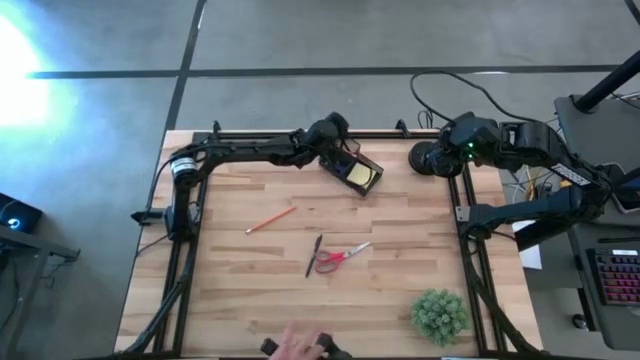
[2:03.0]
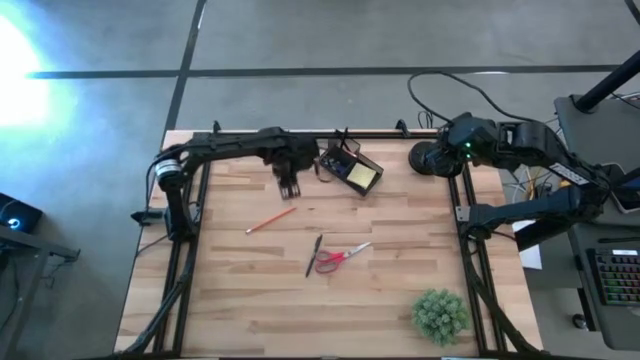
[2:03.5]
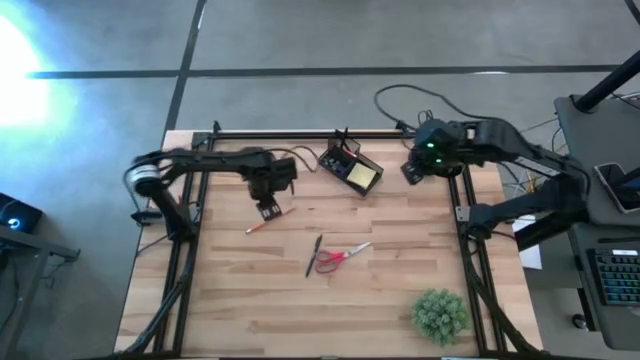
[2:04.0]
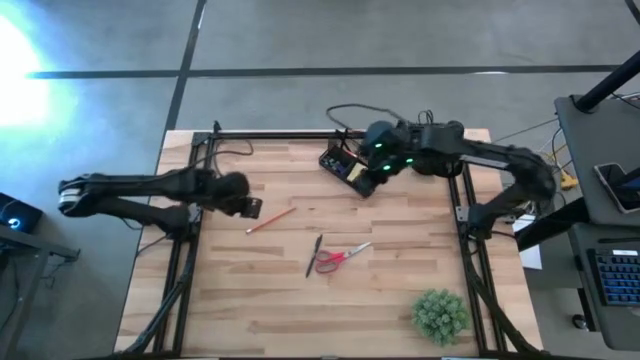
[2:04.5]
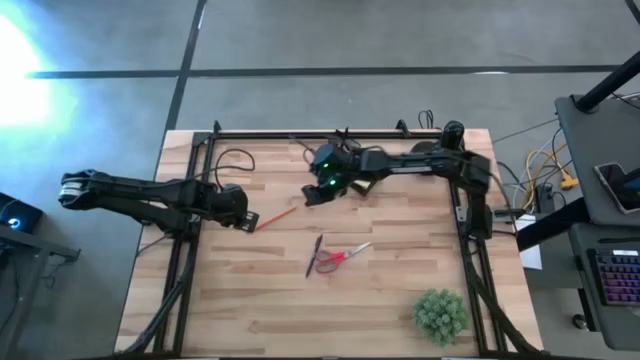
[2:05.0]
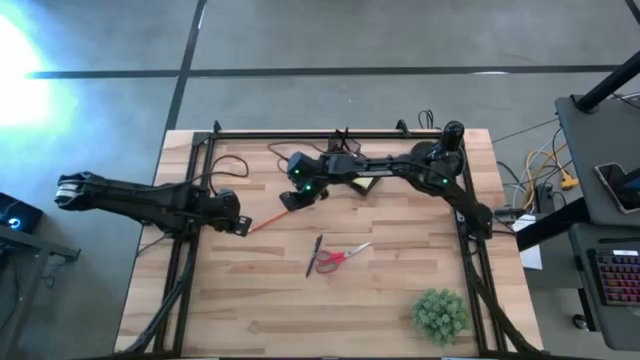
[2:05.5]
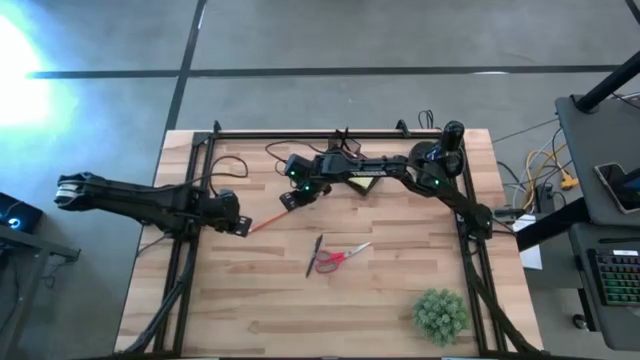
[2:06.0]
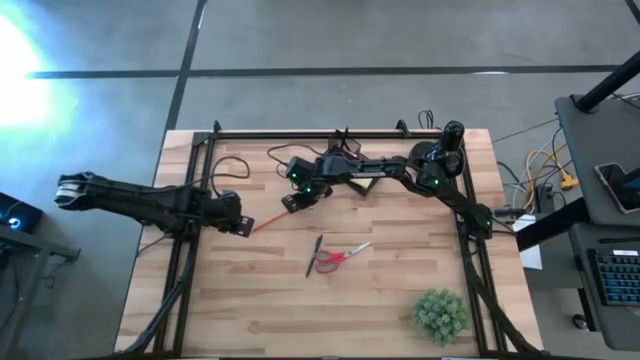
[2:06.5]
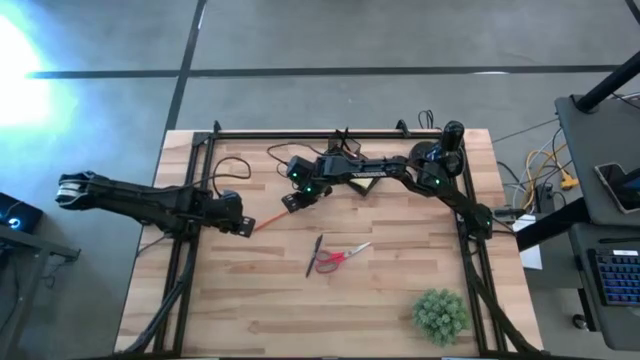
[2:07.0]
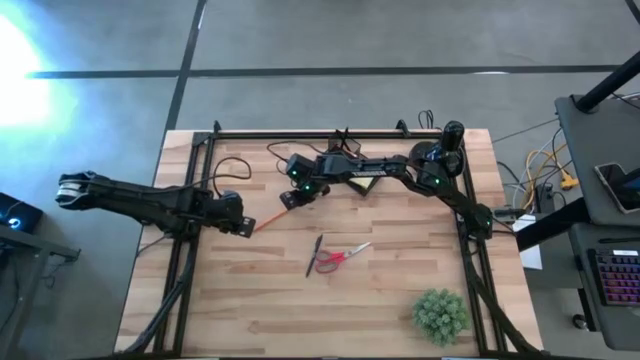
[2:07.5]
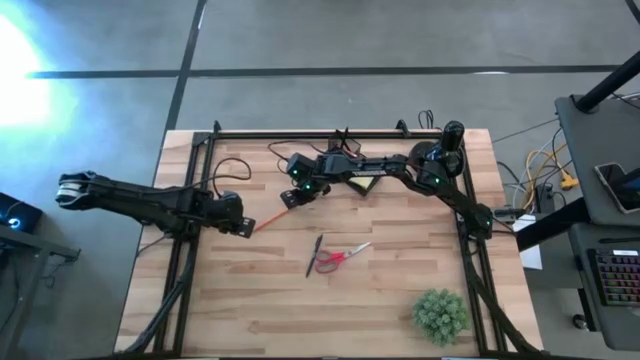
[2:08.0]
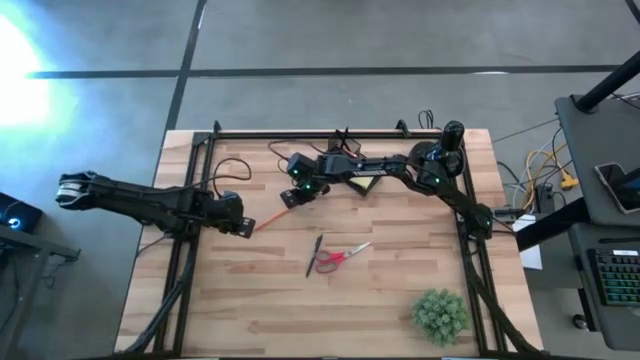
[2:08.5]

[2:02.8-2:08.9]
Task: Pick and place office supplies into organizer
Put the pencil into the desk organizer

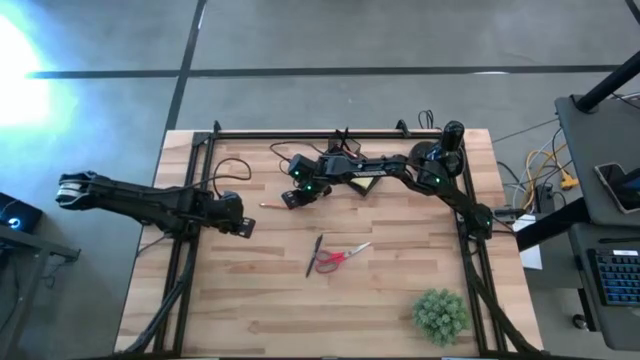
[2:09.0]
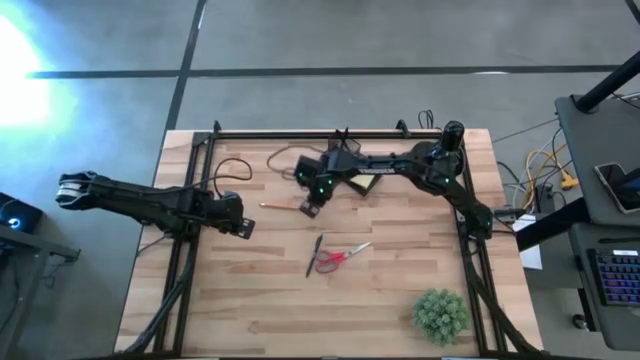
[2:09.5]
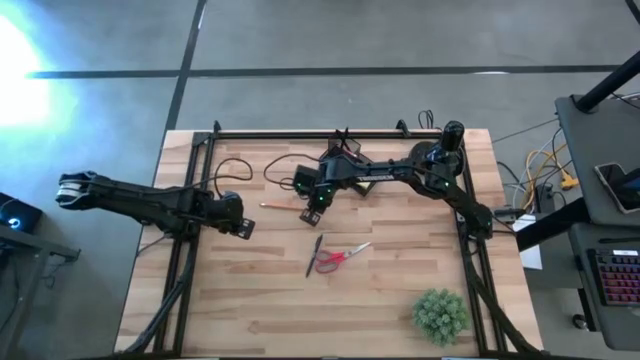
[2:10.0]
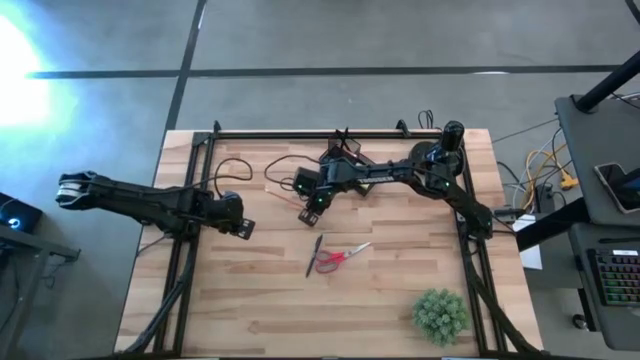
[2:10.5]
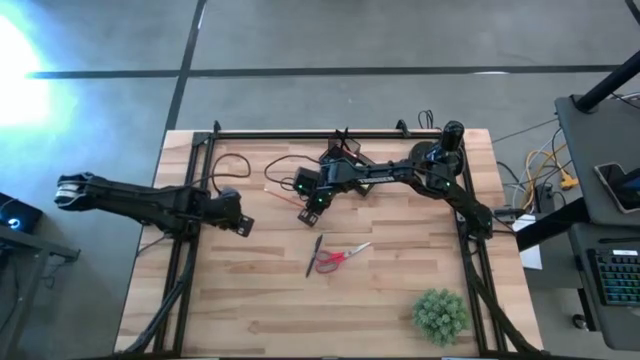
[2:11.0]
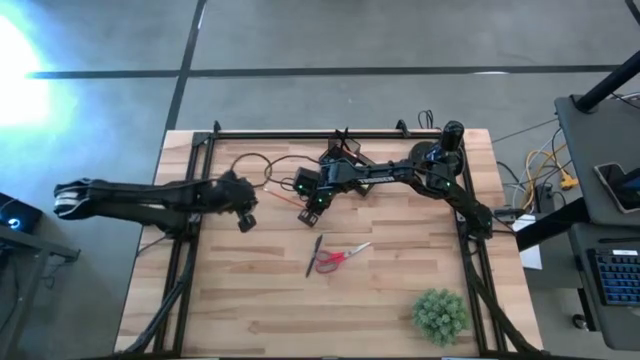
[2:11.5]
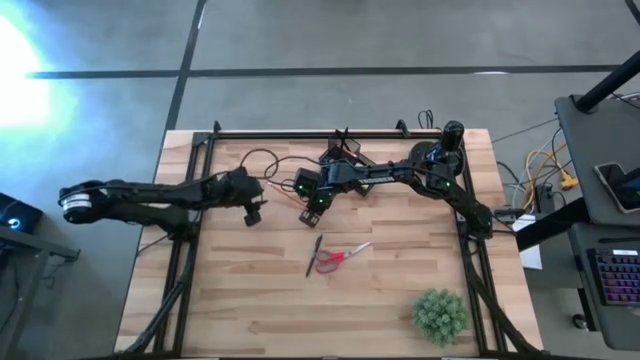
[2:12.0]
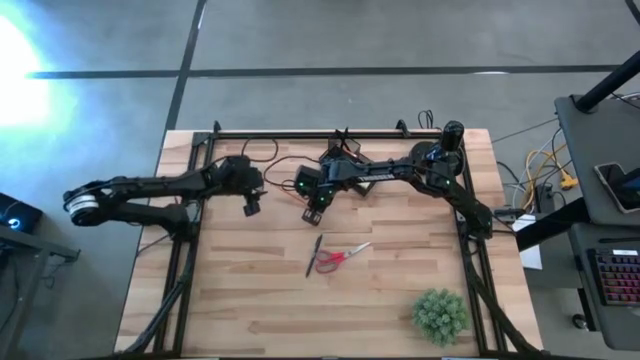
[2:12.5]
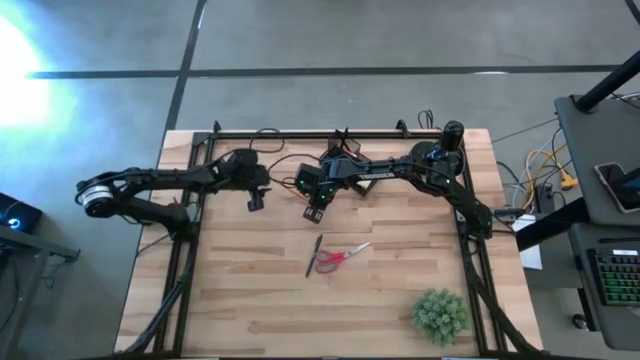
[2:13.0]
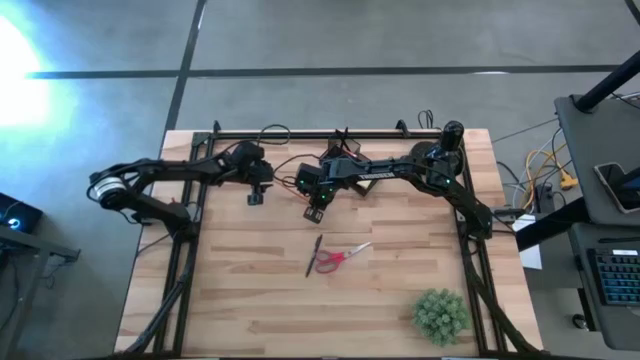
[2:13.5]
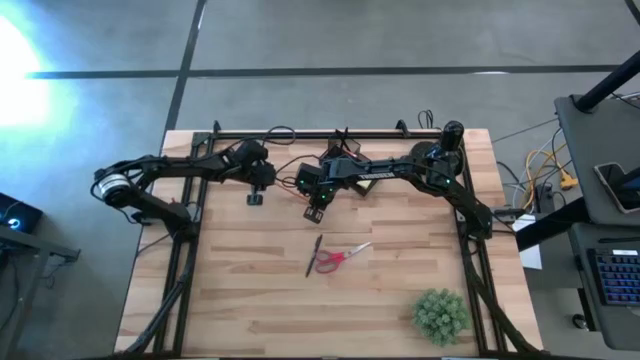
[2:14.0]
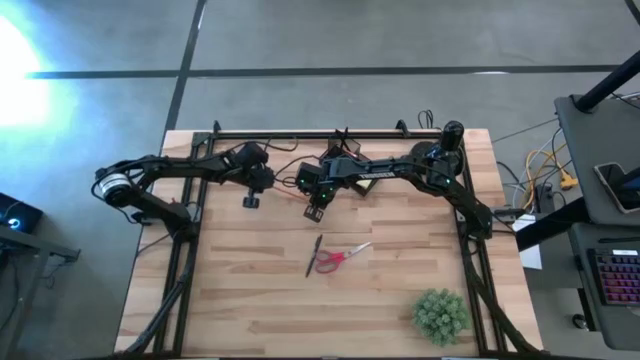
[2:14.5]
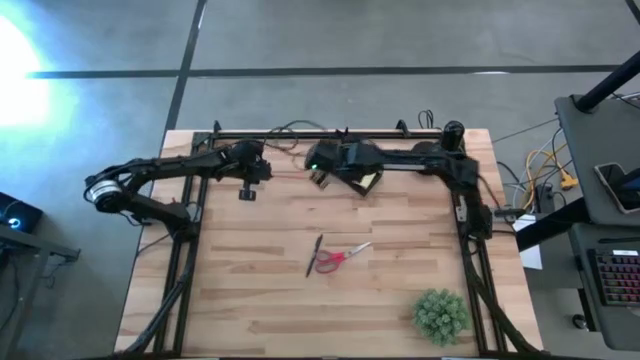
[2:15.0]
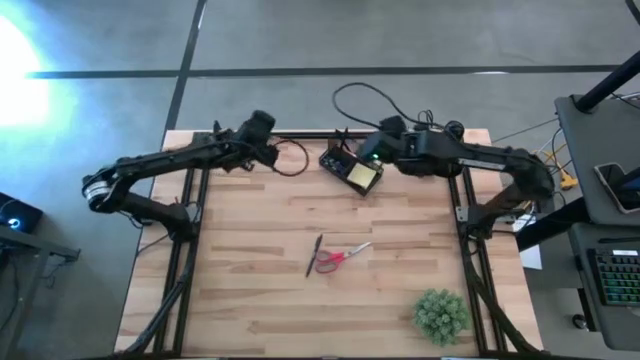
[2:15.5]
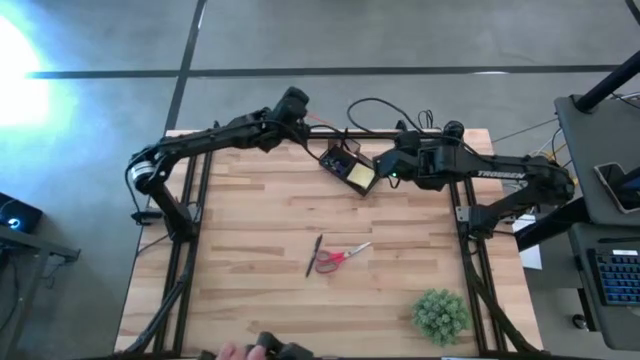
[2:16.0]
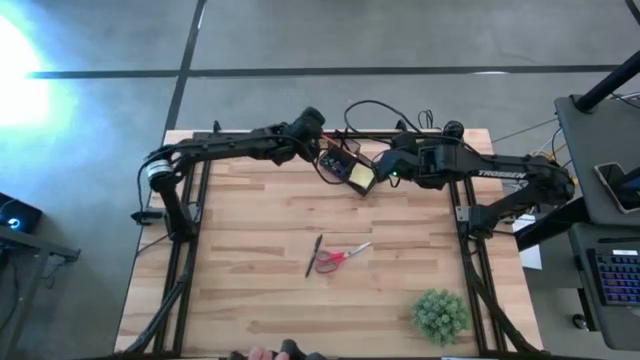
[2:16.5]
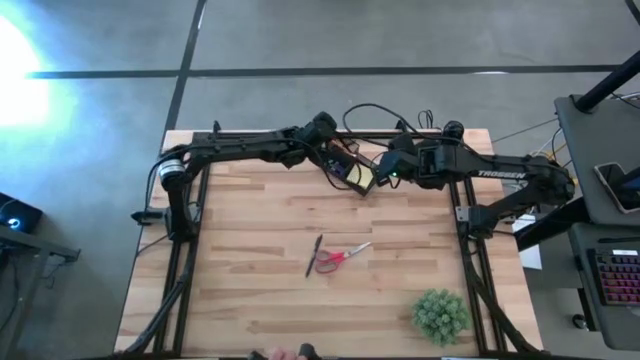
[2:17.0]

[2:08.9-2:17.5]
Put the pencil into the desk organizer

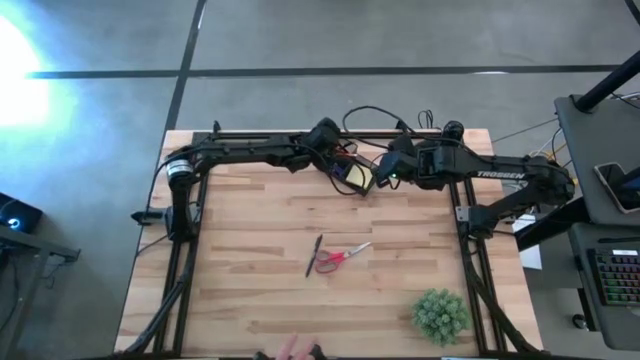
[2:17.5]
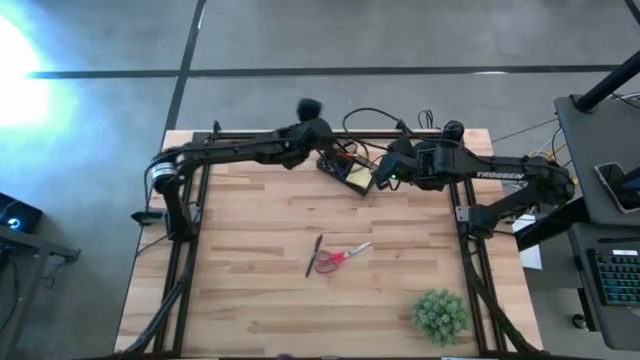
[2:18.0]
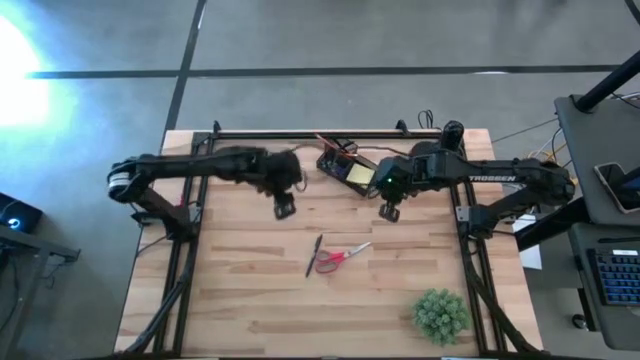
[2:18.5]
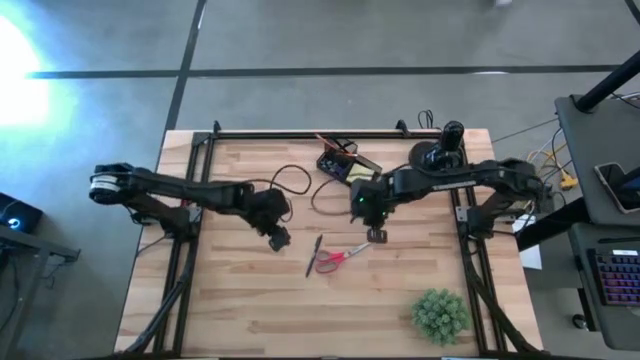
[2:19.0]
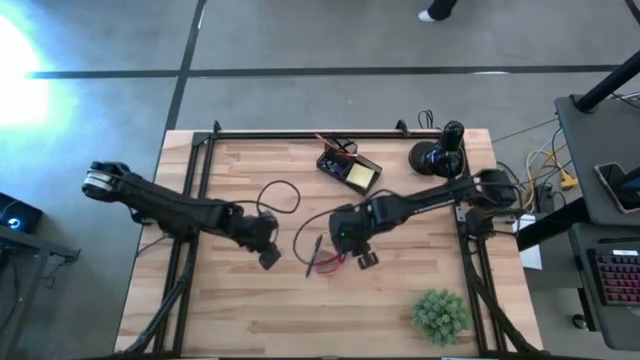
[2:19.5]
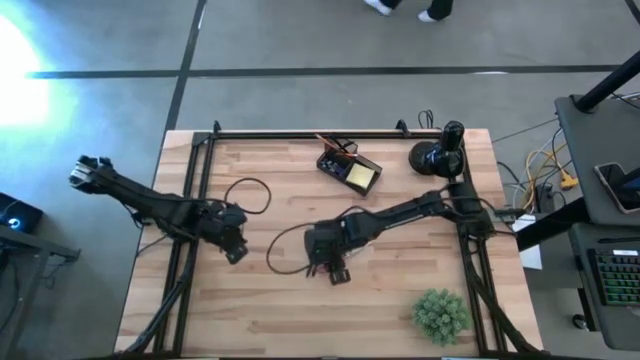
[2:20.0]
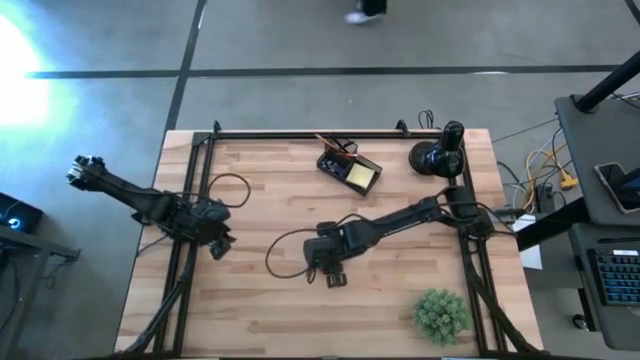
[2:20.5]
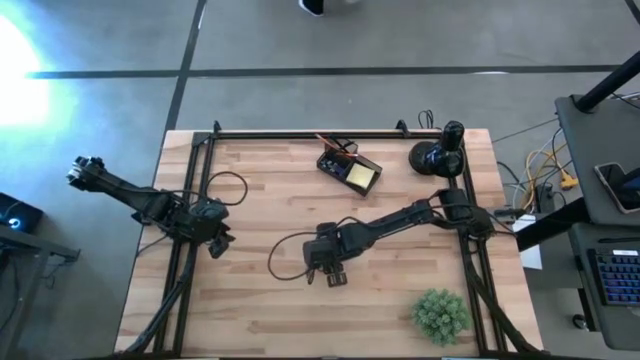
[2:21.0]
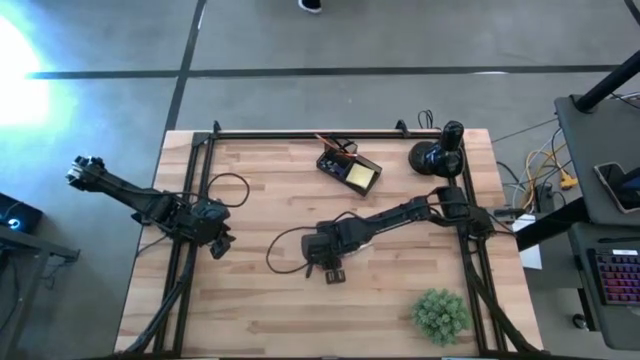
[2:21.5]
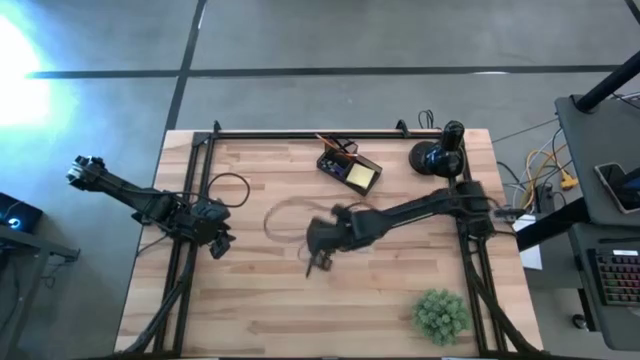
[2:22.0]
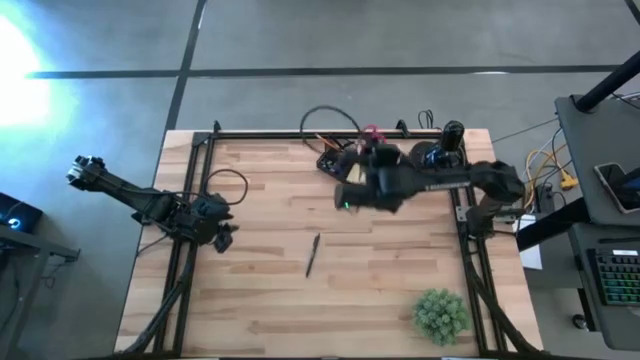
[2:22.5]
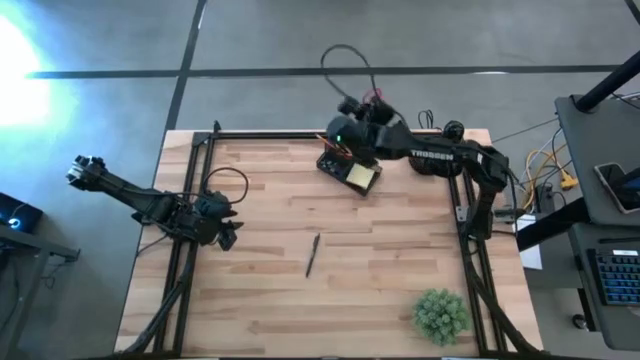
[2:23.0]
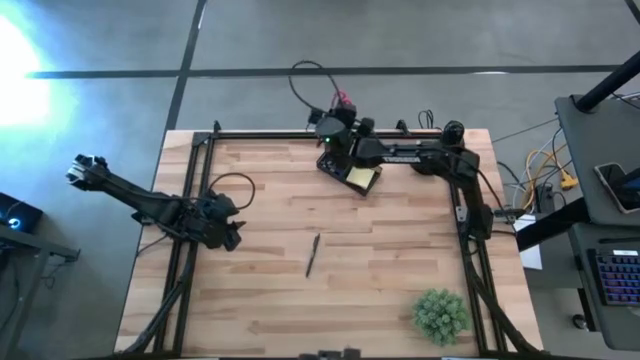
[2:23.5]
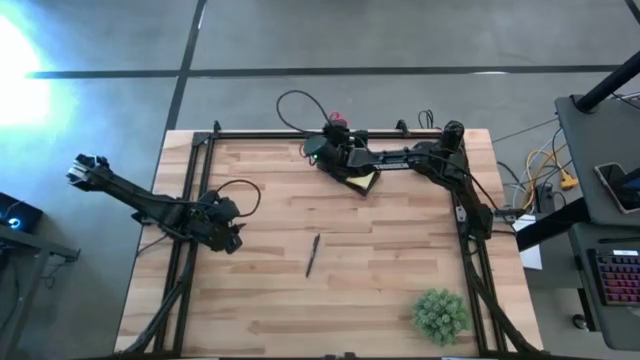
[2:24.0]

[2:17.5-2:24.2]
Put the scissors into the desk organizer
